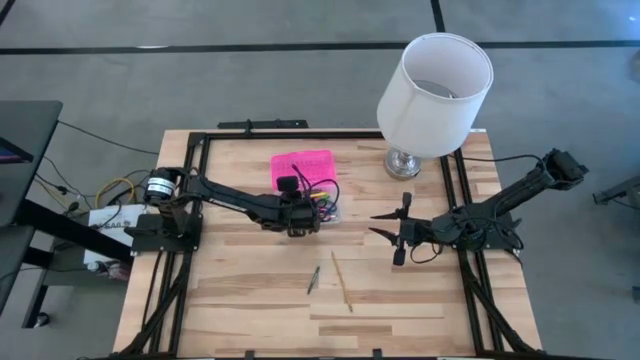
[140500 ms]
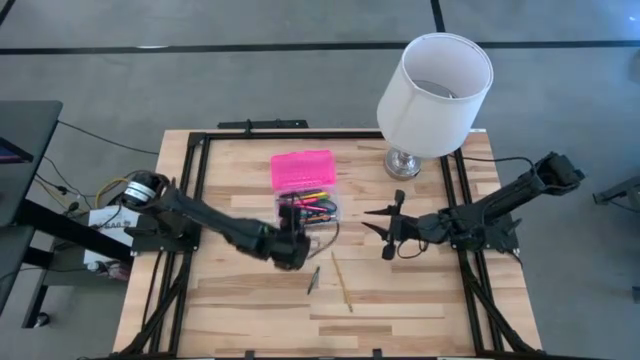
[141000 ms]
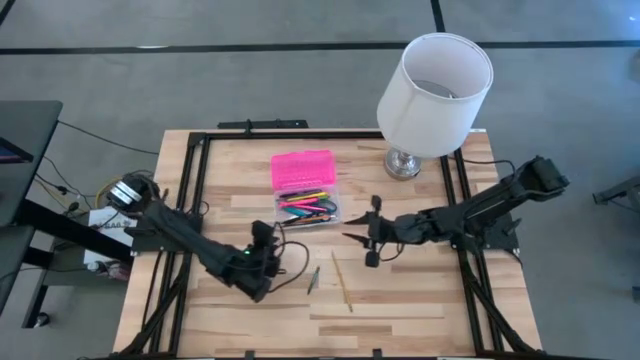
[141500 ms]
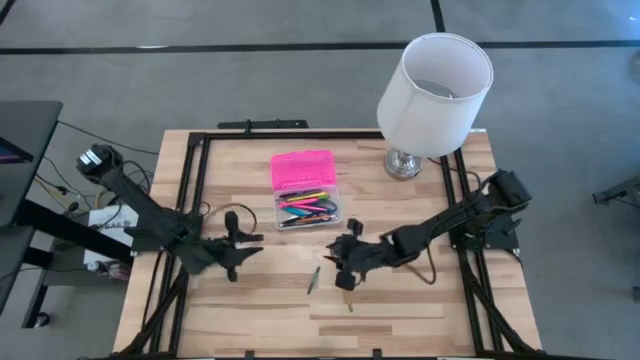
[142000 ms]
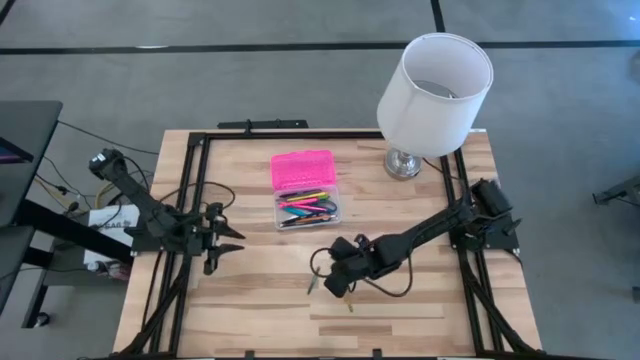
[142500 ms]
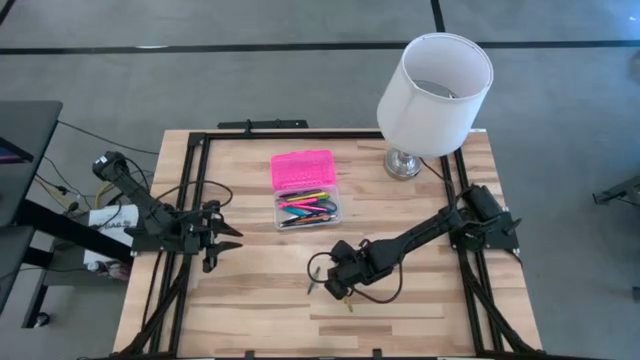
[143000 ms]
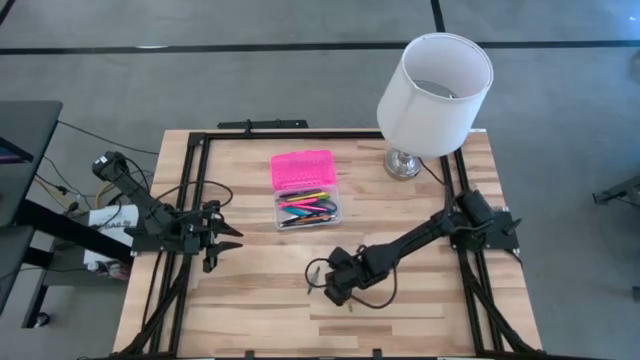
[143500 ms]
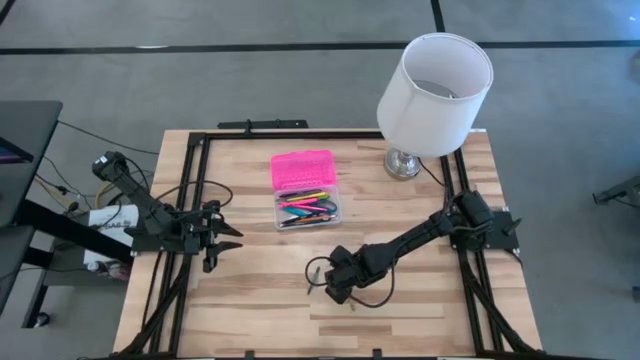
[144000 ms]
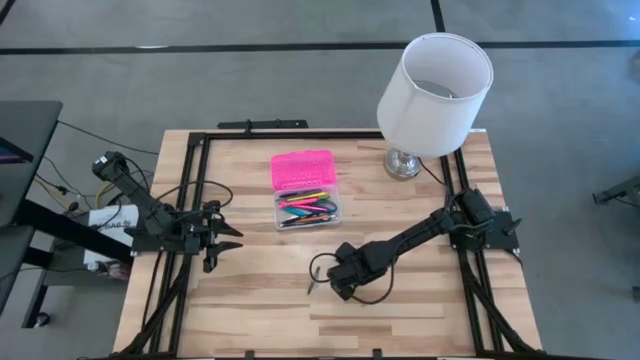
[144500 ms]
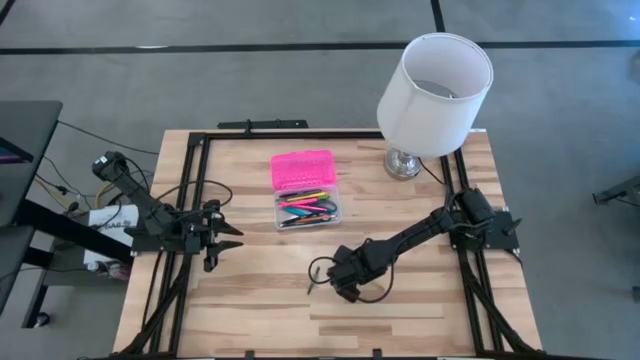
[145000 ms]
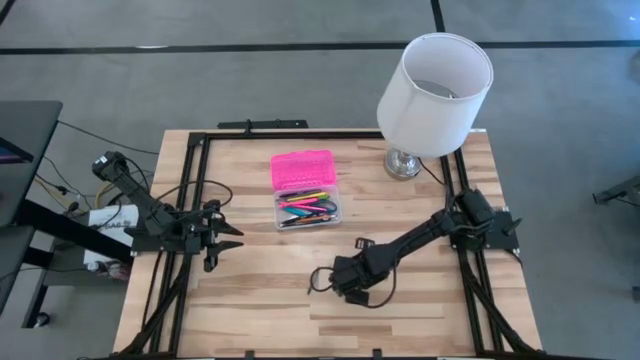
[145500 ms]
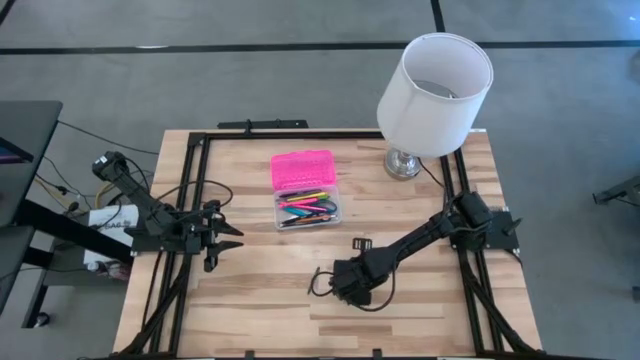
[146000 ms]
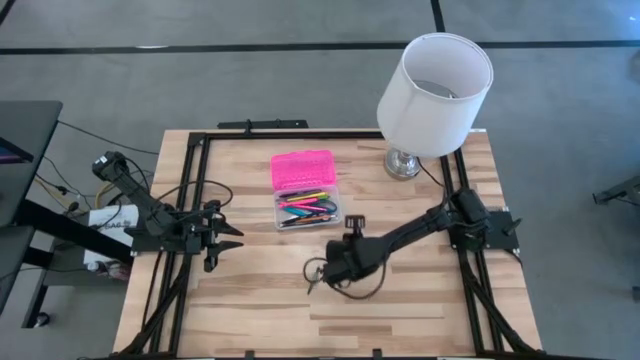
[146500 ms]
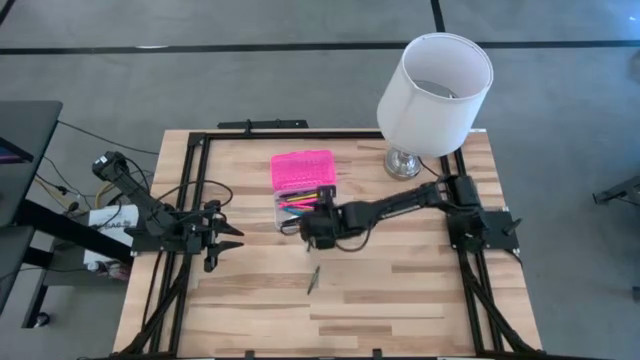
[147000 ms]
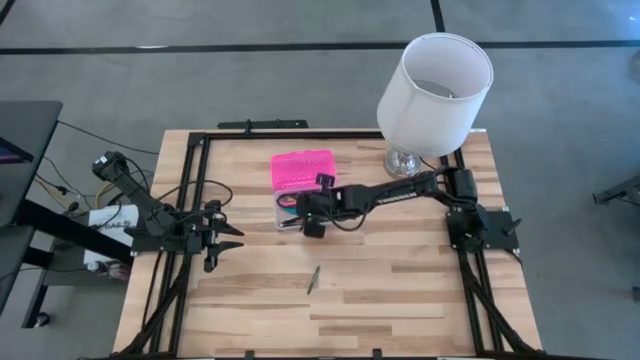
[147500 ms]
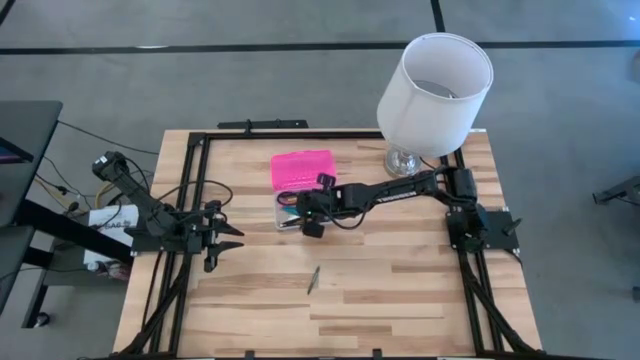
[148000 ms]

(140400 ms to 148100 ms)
Task: Pick & place school supplies into a supply box
Put the light yellow pencil into the pink supply box

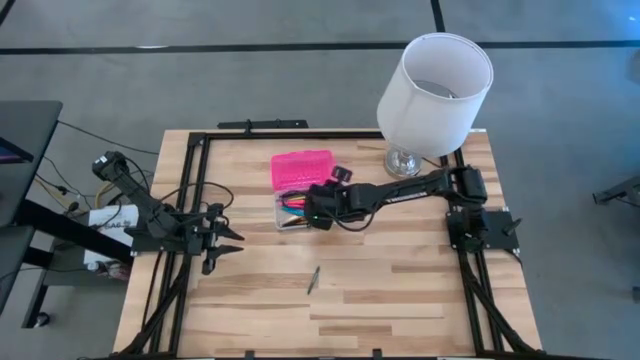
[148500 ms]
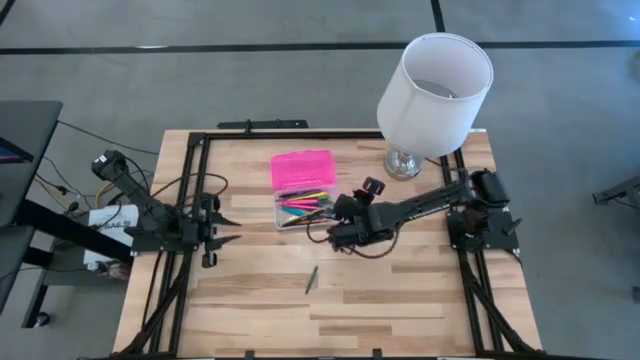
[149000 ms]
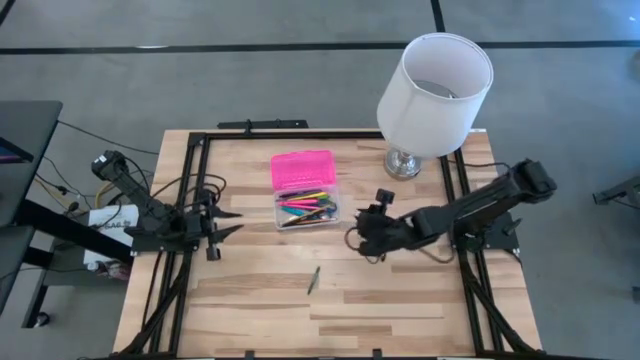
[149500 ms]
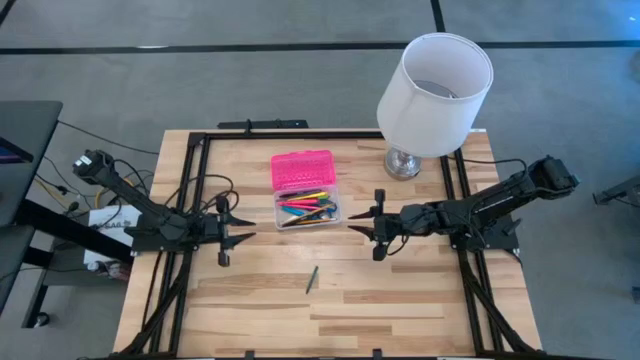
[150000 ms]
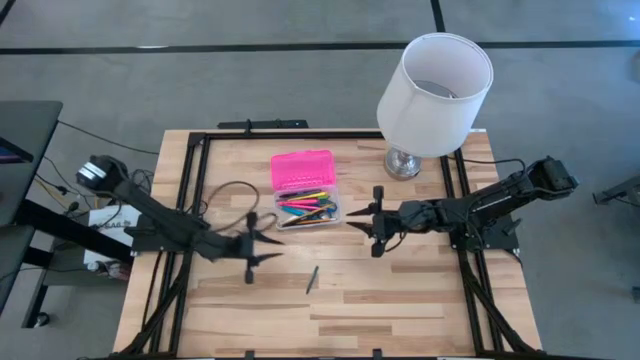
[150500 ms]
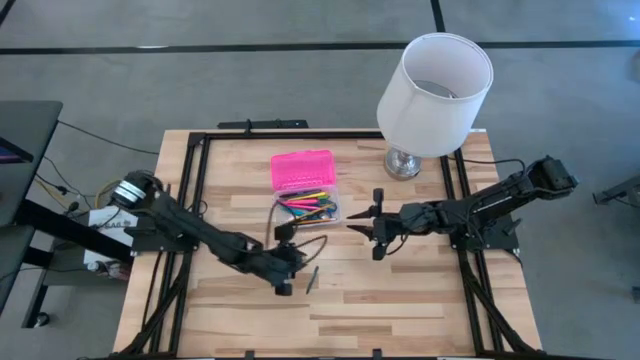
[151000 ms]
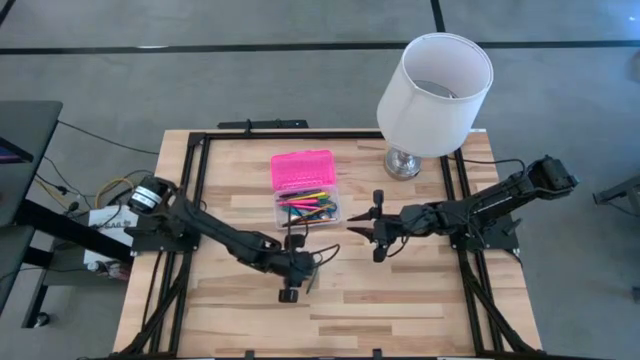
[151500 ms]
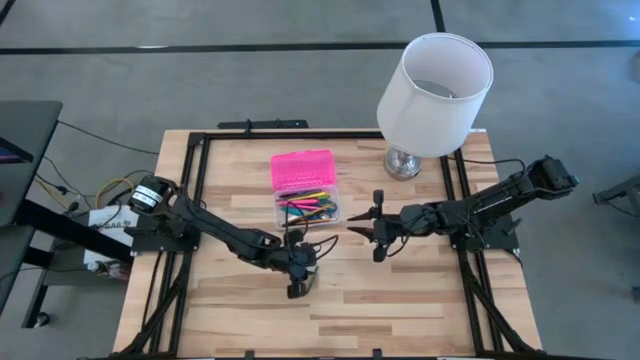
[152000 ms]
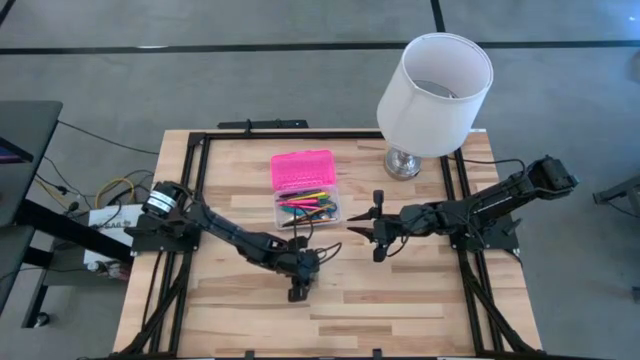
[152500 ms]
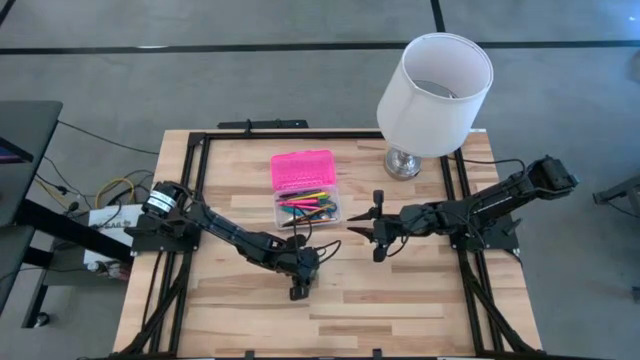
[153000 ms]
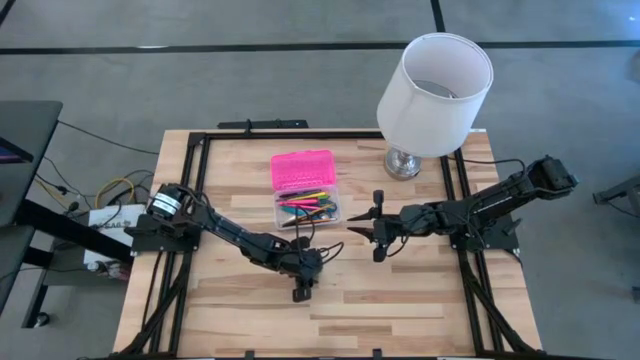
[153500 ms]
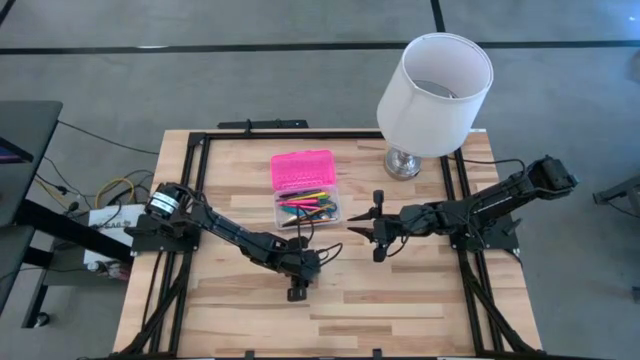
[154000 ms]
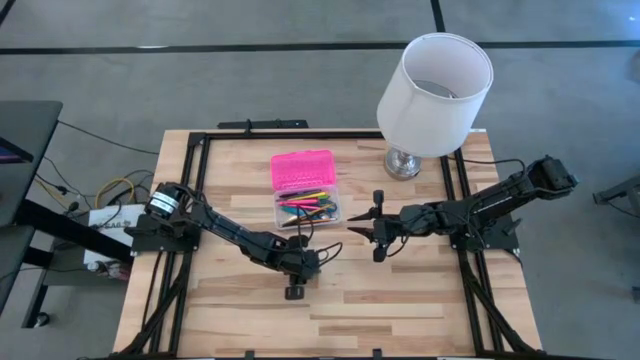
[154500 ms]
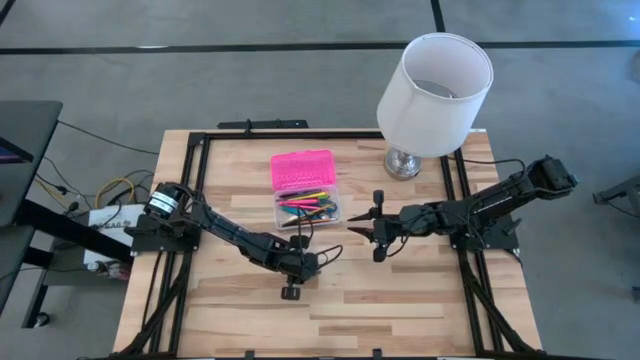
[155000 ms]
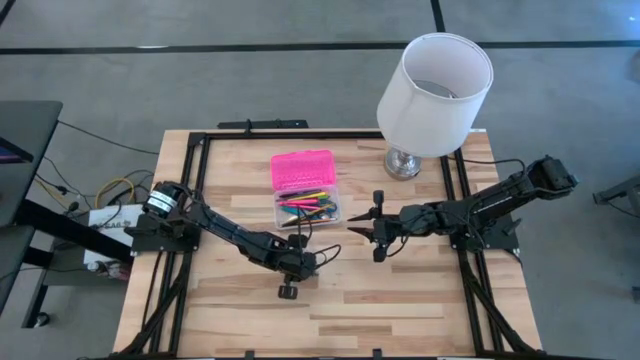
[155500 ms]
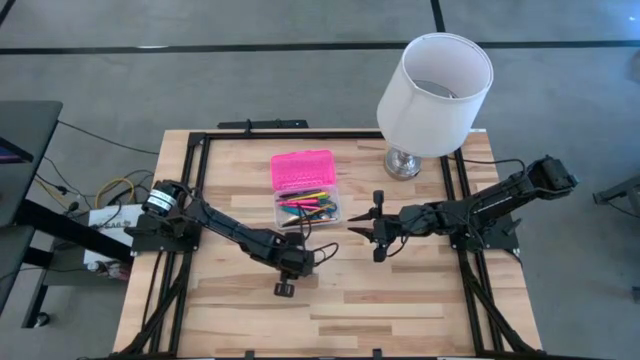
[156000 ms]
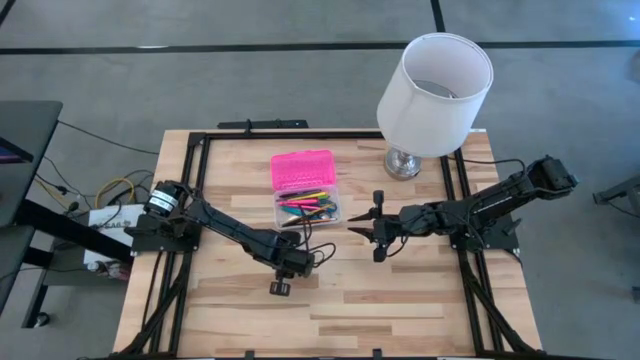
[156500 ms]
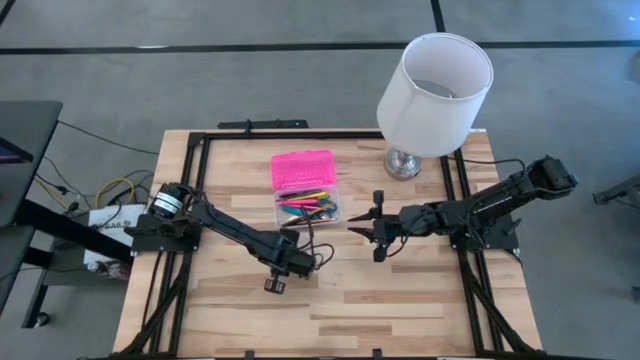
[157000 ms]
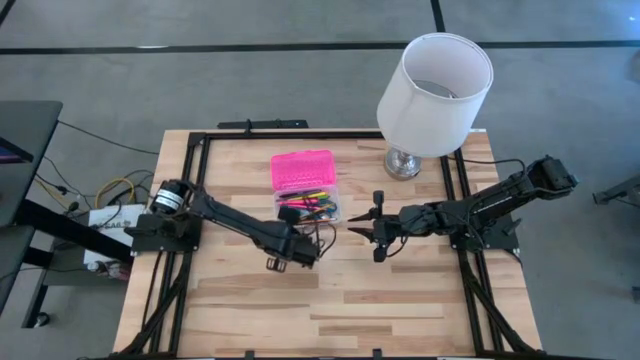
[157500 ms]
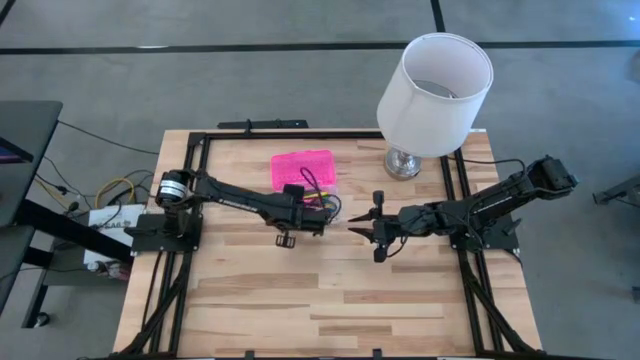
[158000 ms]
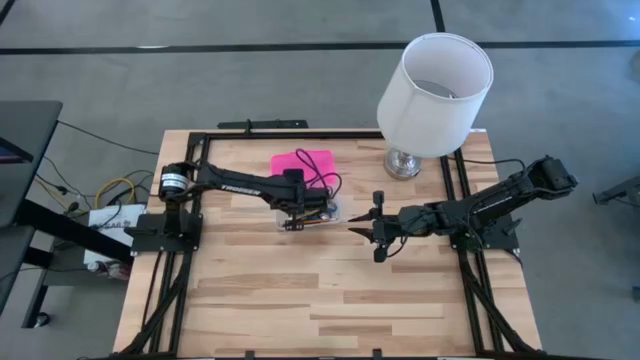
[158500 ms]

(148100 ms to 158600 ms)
Put the green crayon into the pink supply box

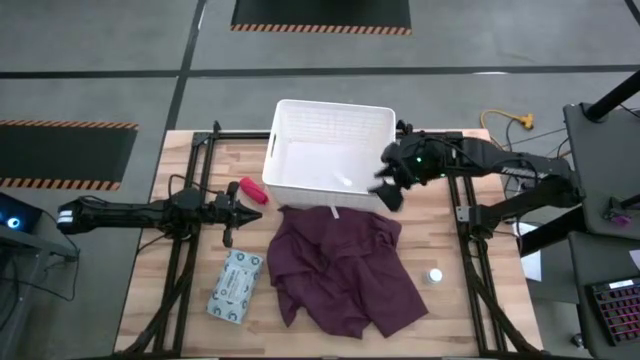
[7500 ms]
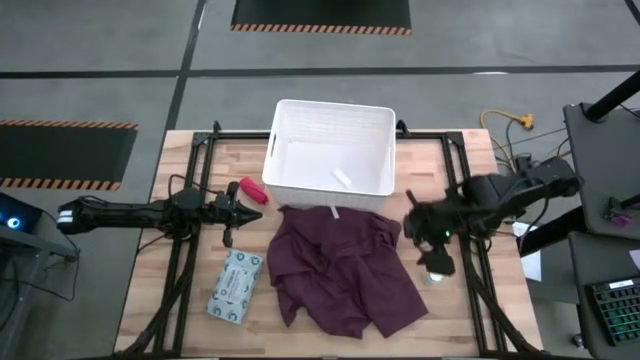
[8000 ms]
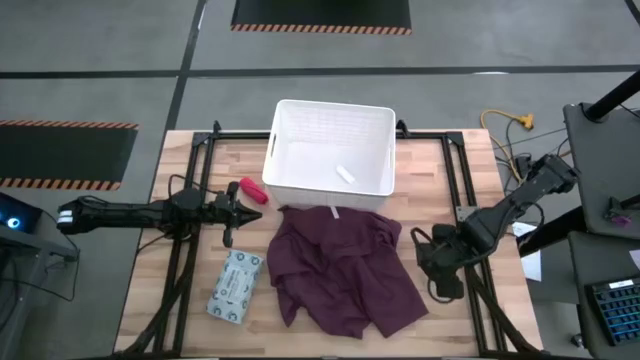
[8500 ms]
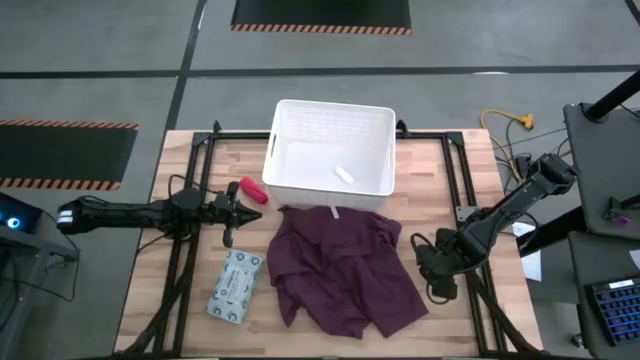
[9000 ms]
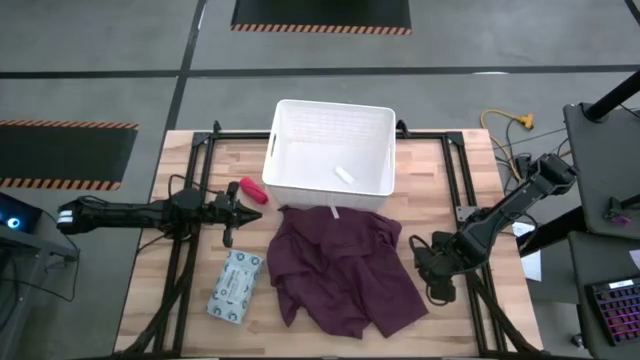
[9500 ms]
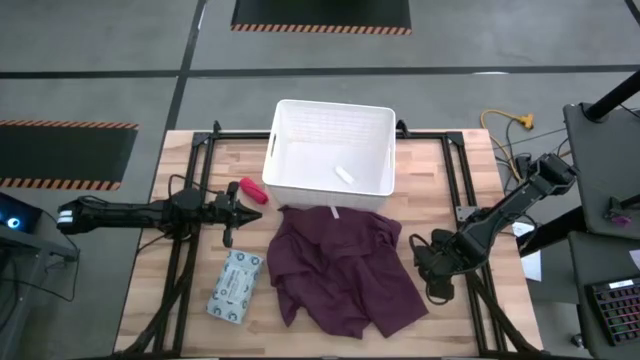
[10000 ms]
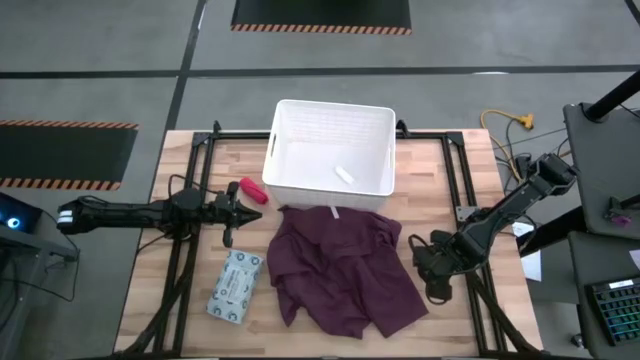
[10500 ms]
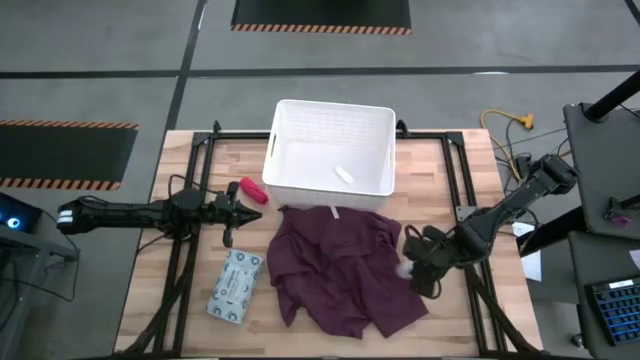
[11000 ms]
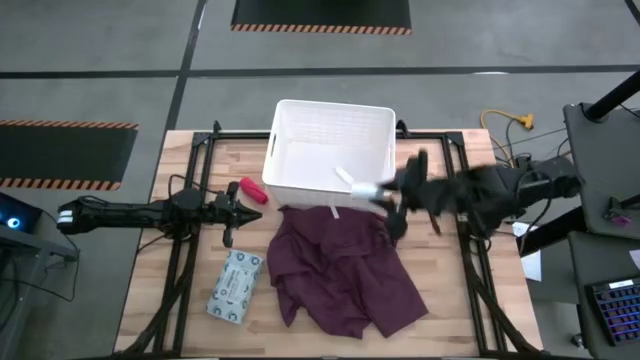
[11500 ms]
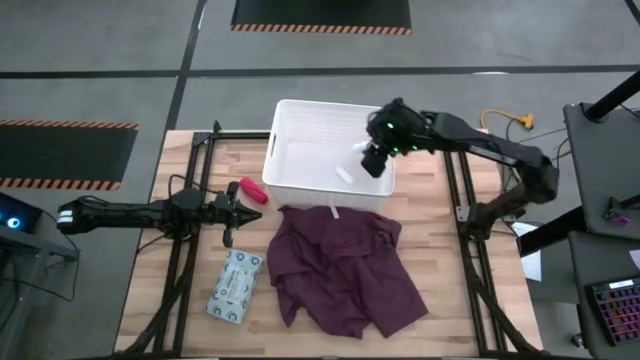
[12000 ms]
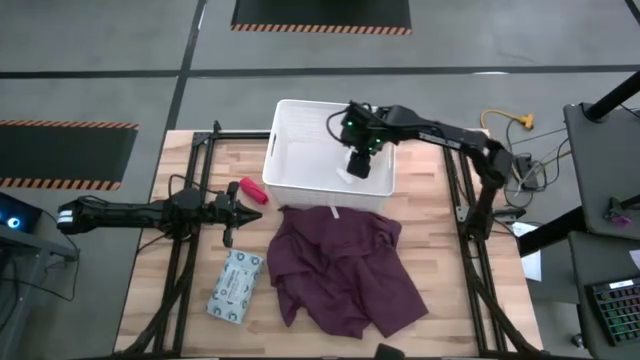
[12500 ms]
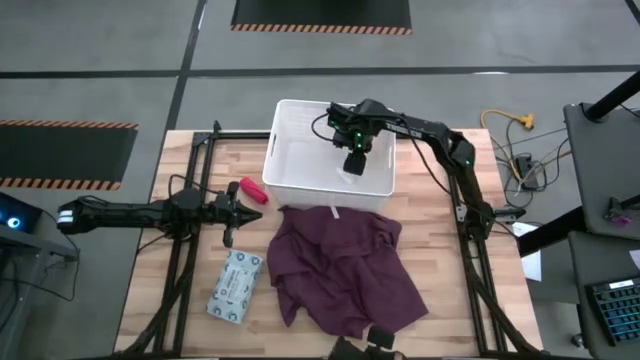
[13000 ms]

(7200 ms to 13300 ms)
Task: Pick & place medical supplies in basket/bin
Put the white medicine bottle into the white basket
